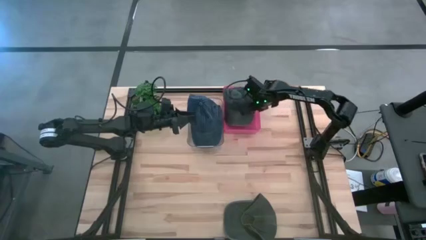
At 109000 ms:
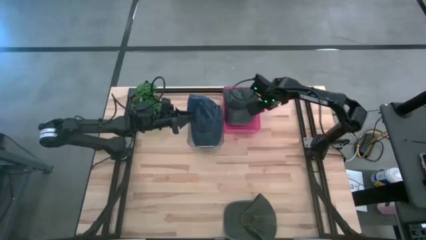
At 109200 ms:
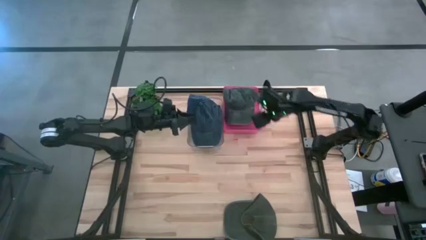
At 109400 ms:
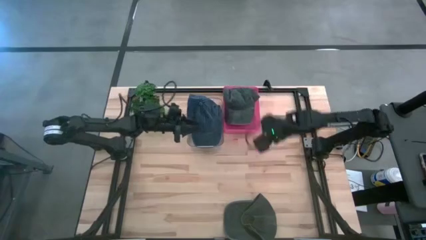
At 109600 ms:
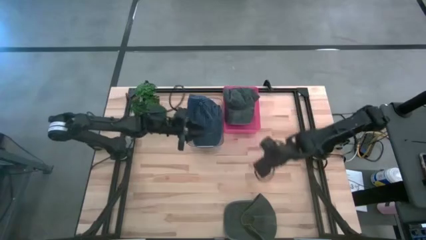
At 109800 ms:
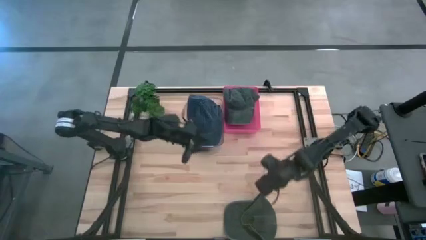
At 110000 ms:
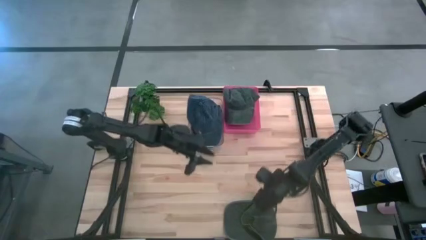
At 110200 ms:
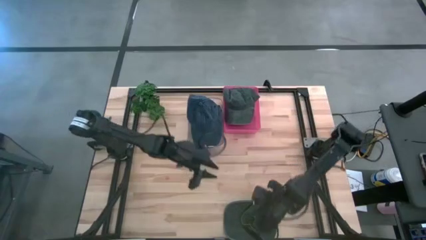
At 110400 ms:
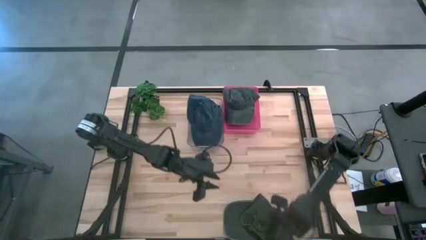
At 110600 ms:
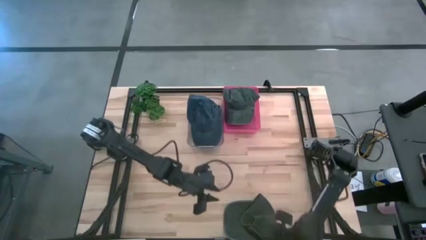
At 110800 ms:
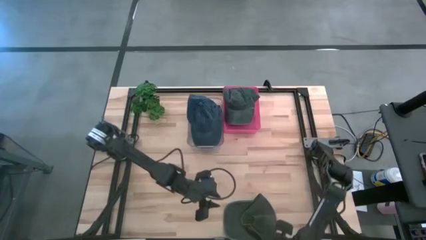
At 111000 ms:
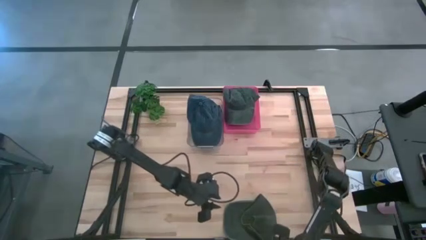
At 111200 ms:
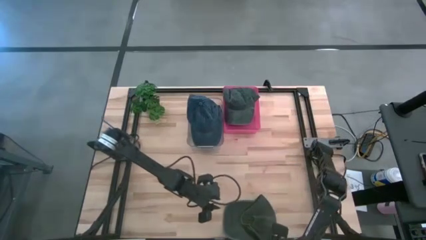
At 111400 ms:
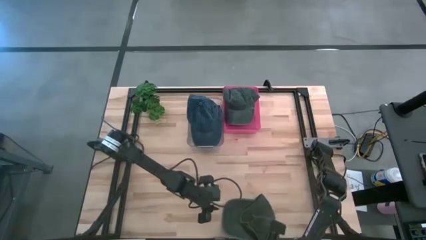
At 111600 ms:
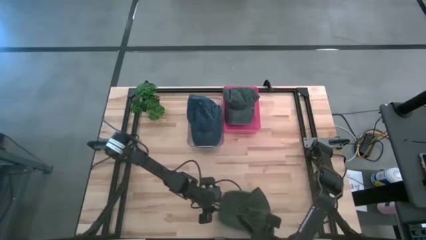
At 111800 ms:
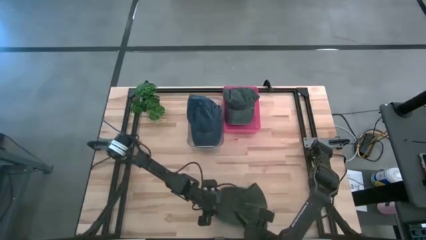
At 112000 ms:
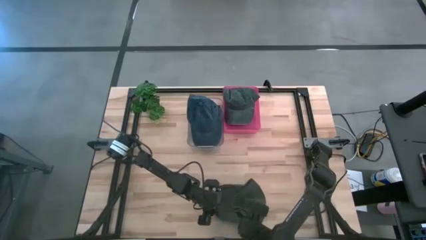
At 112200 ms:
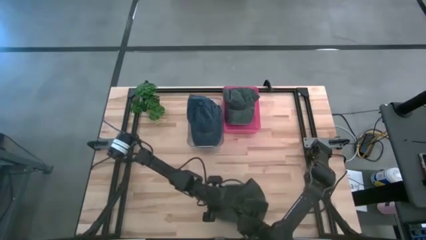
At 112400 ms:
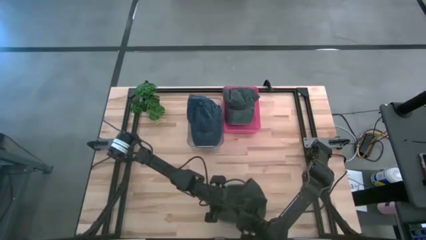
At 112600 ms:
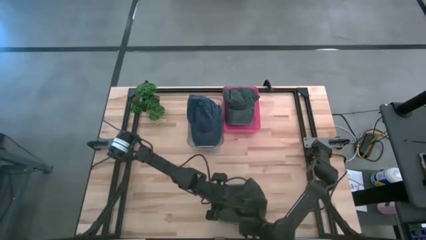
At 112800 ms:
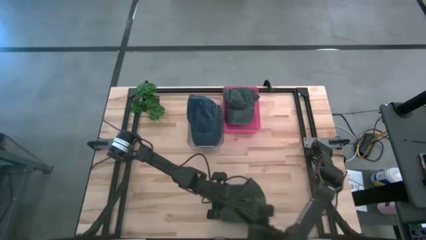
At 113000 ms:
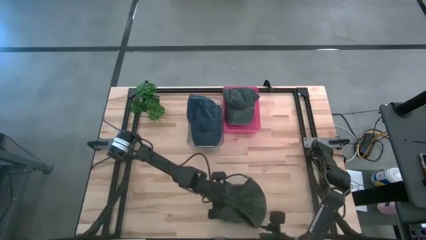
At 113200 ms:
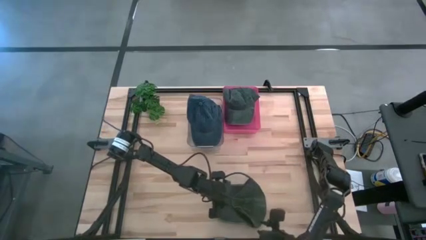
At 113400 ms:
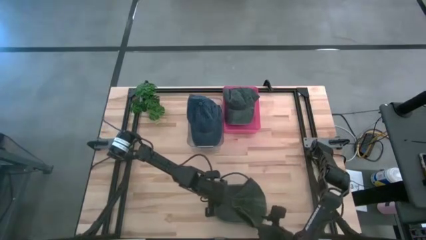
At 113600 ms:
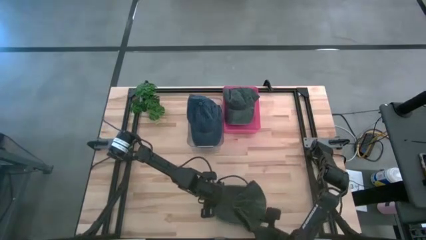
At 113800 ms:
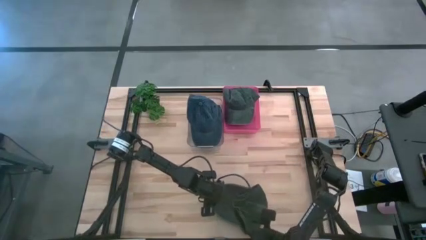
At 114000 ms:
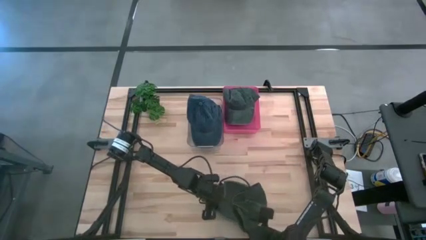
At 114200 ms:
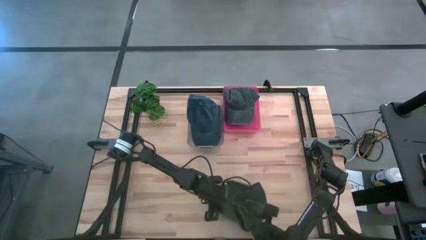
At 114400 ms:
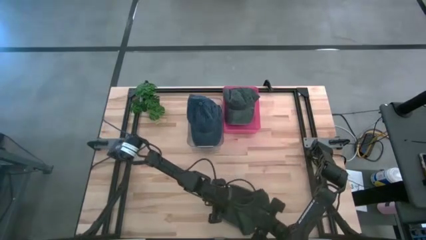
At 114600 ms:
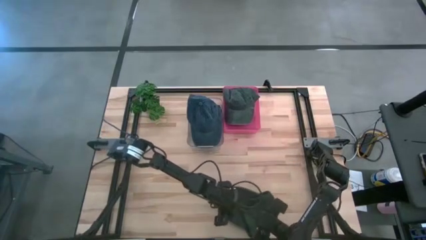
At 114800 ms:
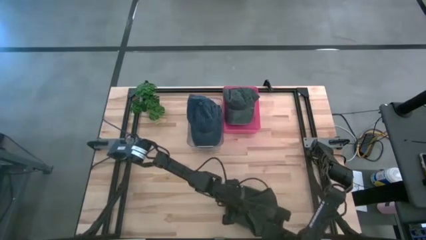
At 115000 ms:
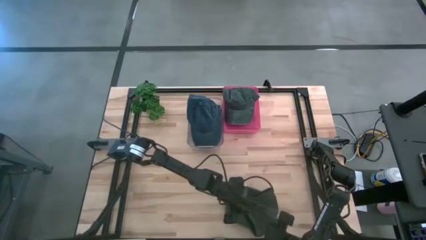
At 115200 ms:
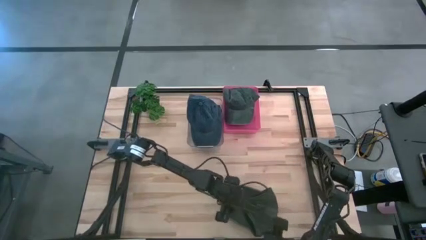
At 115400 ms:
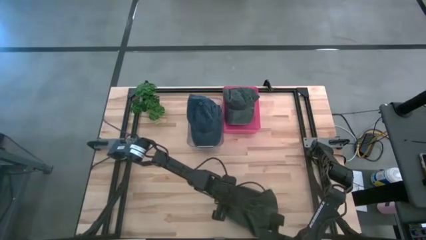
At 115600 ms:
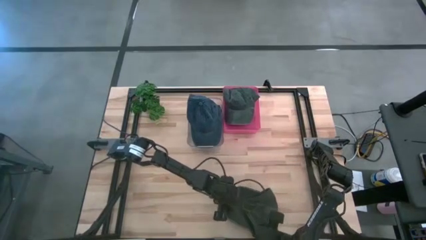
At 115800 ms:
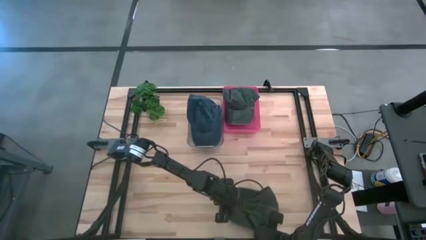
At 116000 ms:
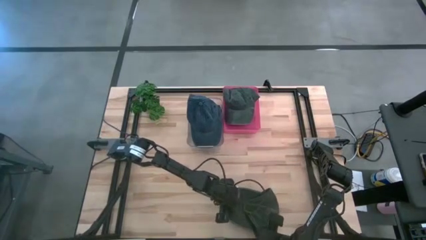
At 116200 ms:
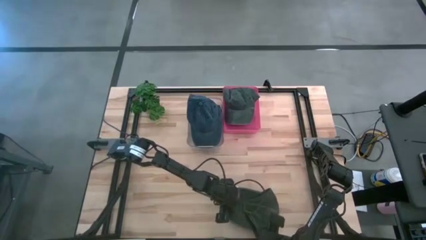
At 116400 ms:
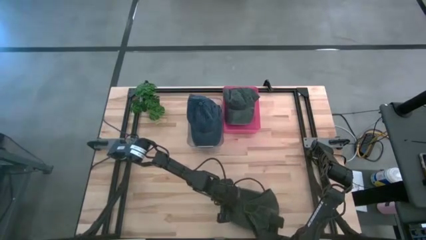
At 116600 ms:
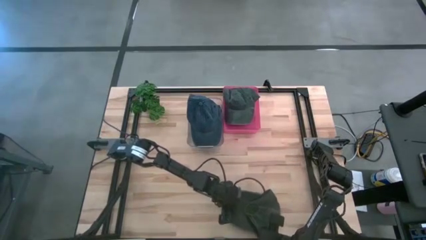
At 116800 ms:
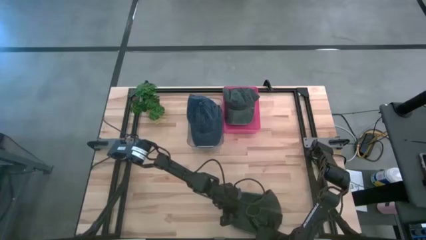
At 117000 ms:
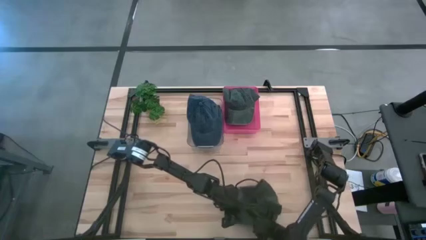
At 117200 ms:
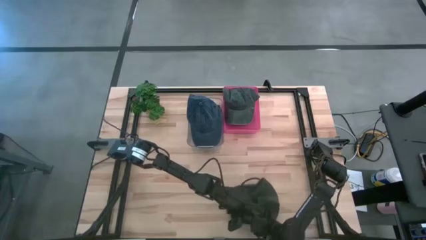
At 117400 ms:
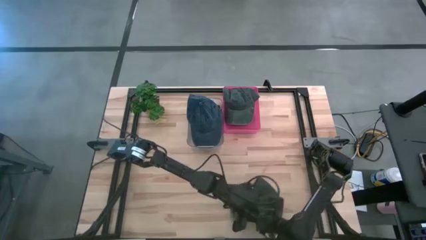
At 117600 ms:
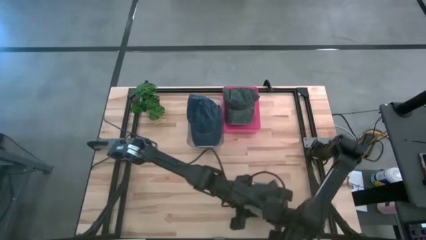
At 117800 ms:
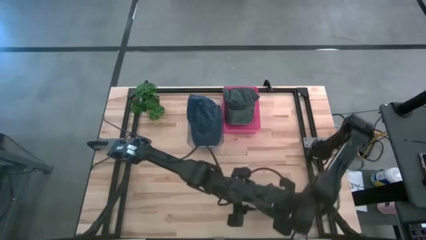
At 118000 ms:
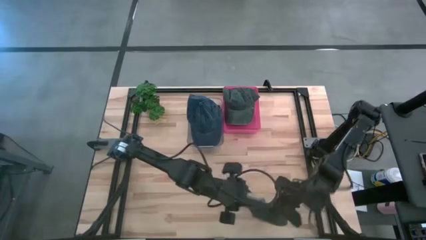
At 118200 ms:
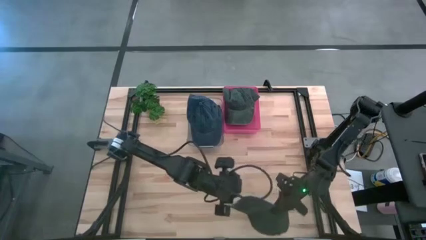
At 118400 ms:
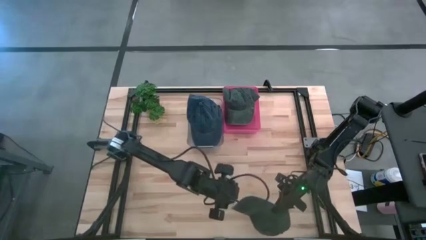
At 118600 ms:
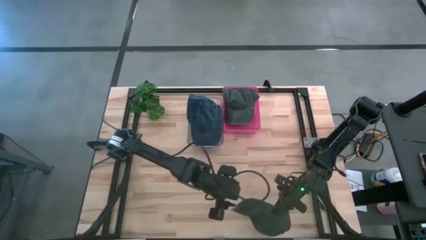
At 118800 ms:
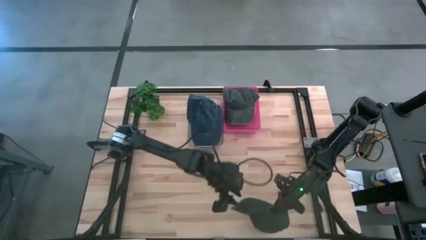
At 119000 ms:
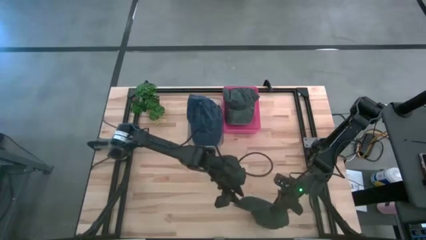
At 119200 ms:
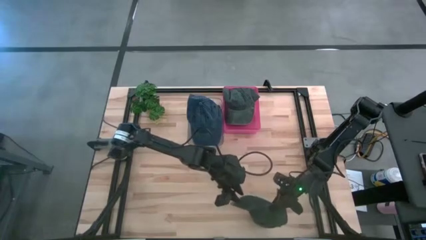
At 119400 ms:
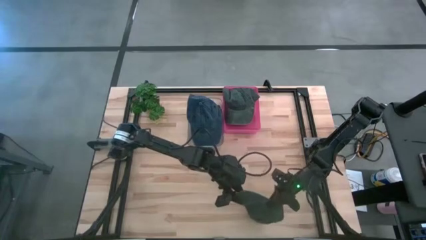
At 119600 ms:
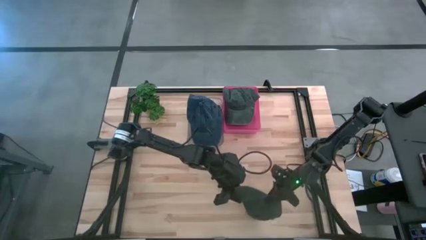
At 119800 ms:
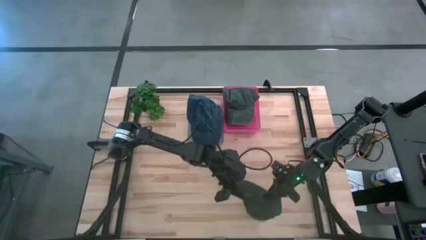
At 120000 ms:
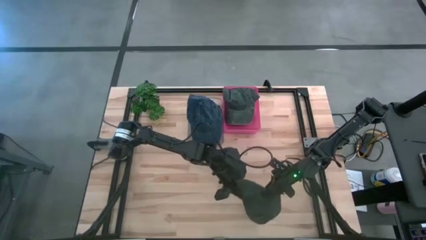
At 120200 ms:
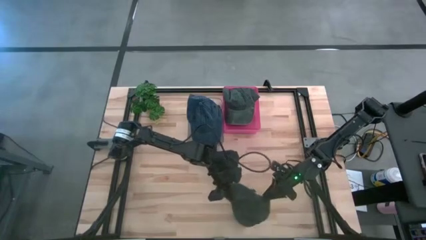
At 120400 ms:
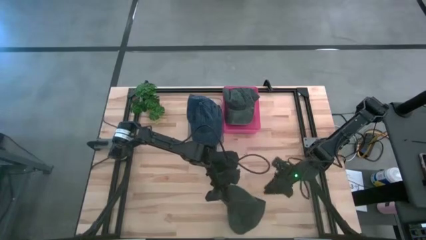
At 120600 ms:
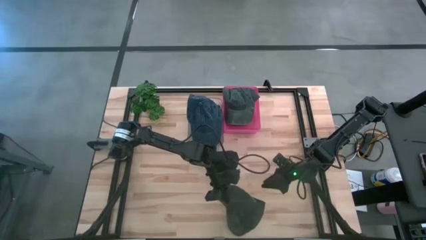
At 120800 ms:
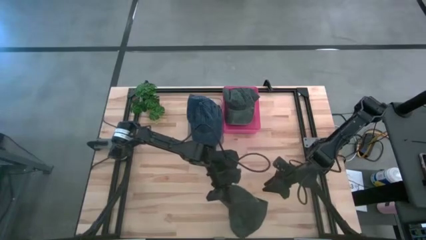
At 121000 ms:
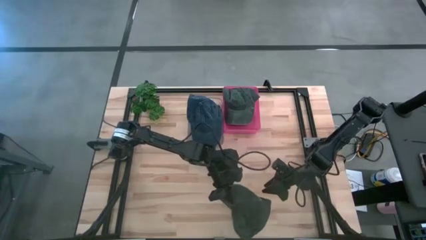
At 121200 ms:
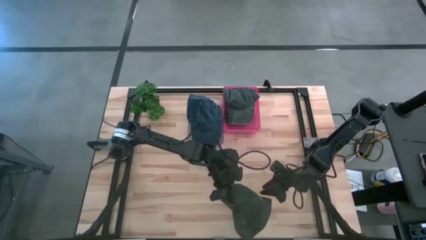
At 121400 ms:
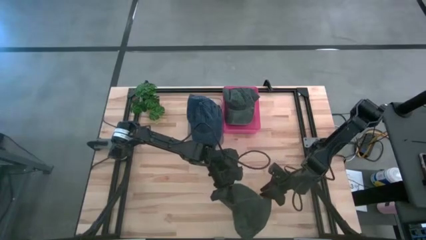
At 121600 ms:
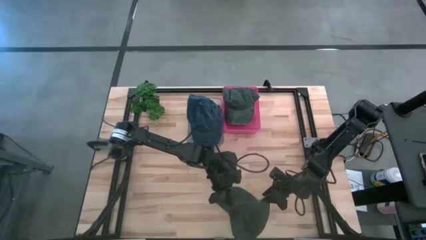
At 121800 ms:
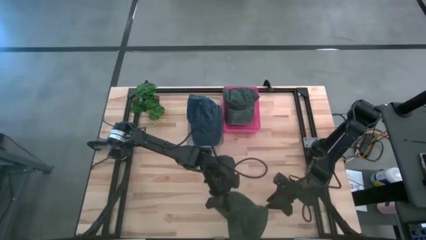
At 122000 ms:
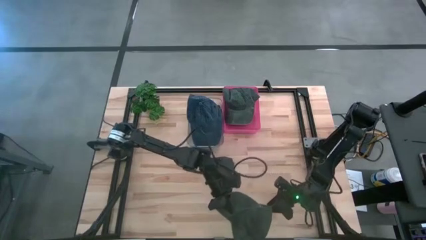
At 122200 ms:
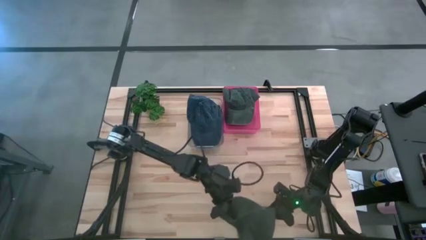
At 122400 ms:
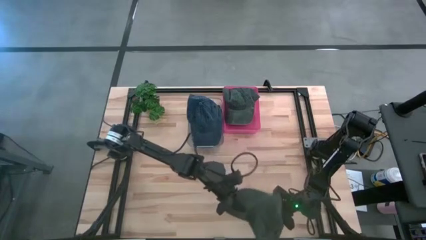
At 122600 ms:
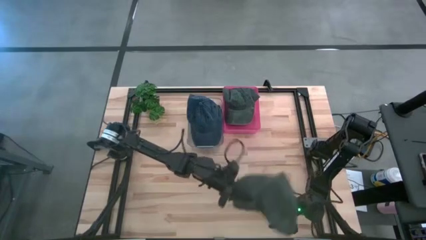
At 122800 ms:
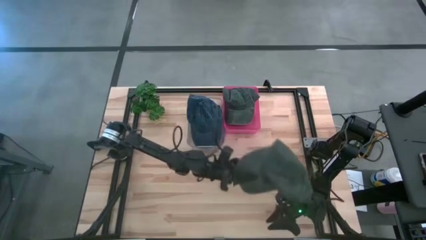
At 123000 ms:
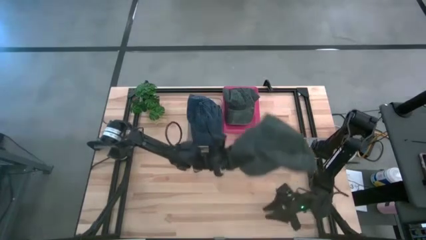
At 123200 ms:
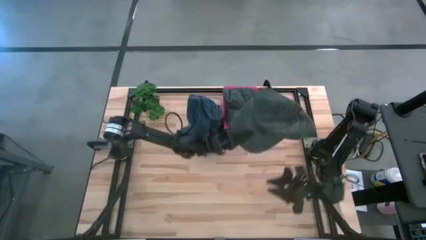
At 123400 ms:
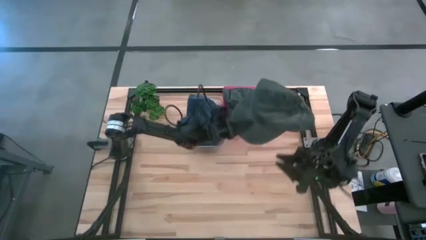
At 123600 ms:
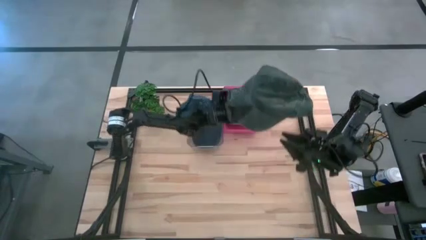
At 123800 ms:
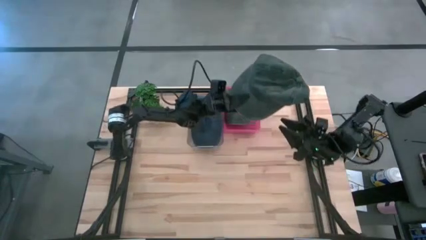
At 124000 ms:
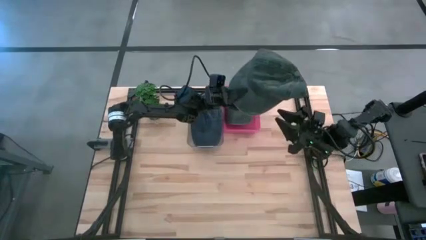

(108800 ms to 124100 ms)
Task: Pick & Place hat
Put the green cap into the red bin
